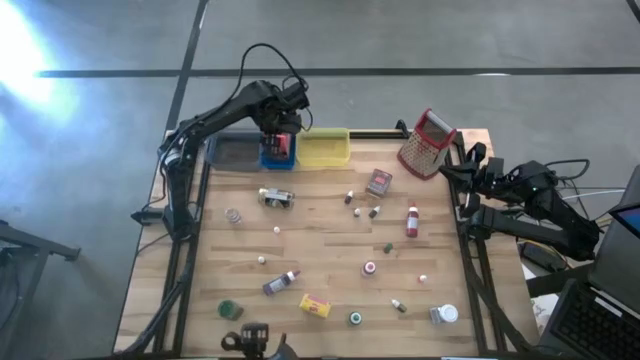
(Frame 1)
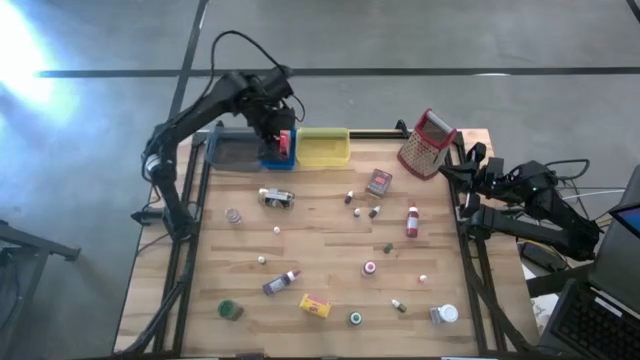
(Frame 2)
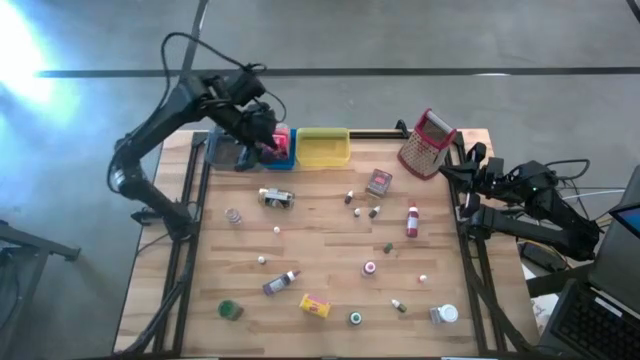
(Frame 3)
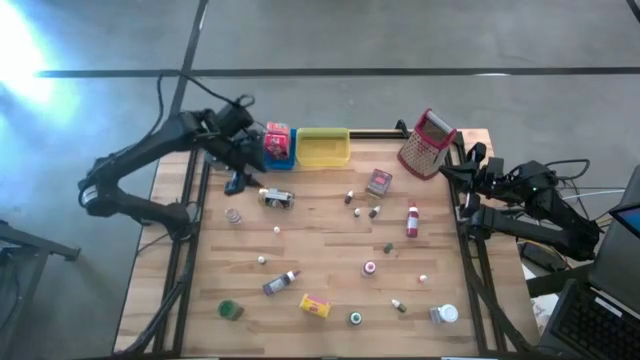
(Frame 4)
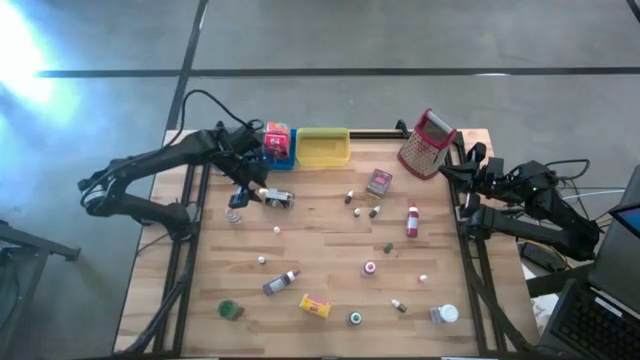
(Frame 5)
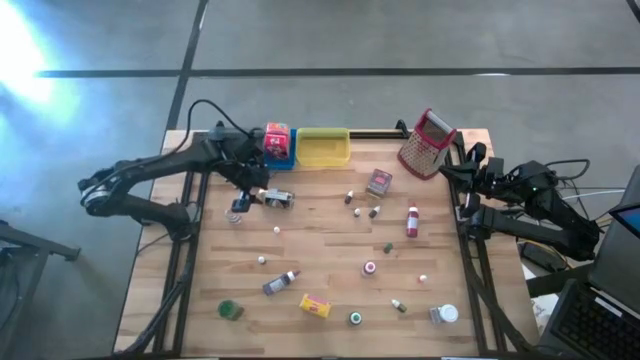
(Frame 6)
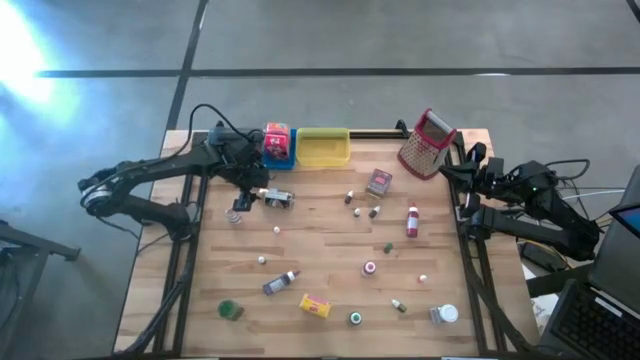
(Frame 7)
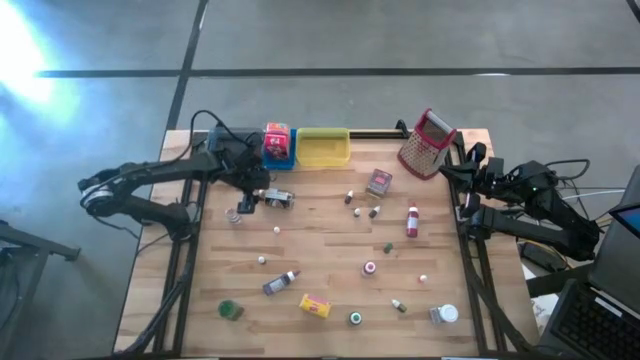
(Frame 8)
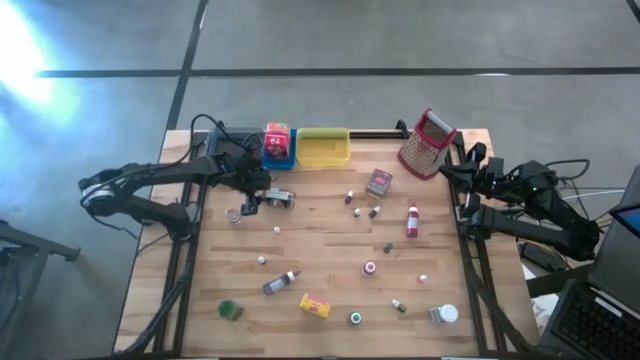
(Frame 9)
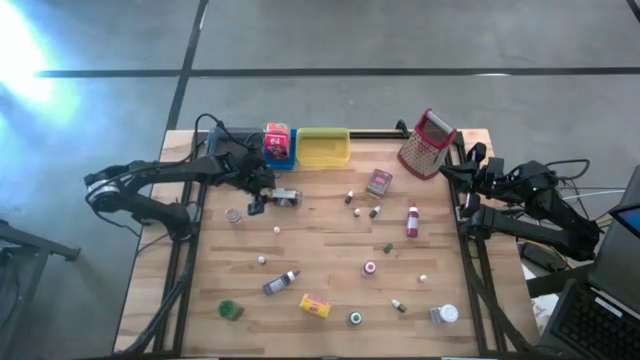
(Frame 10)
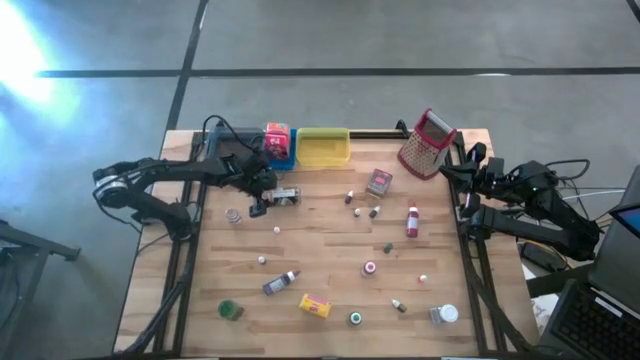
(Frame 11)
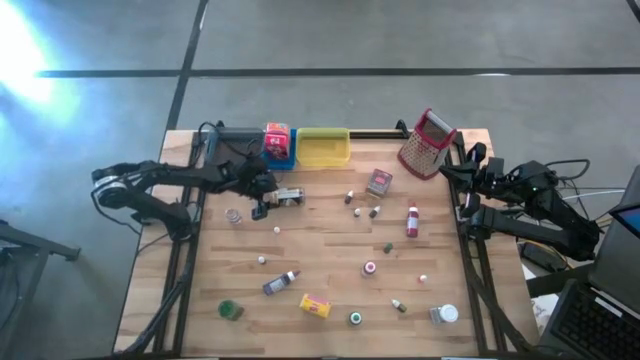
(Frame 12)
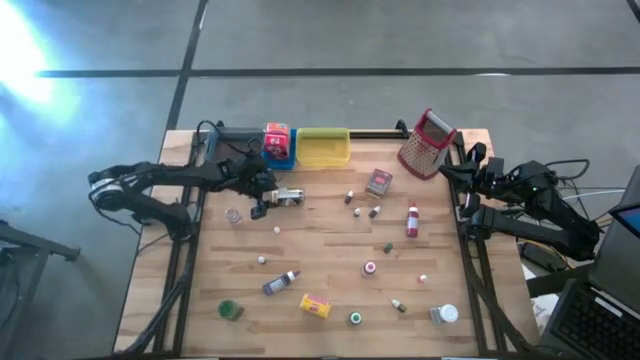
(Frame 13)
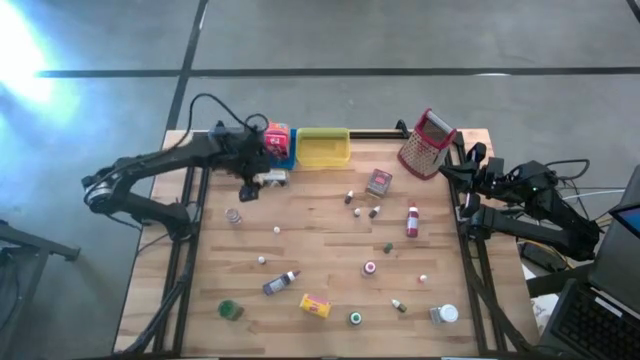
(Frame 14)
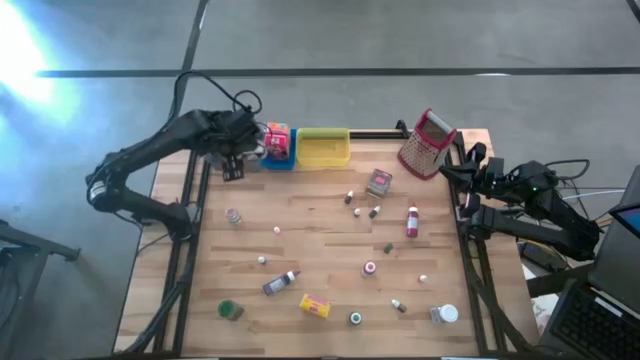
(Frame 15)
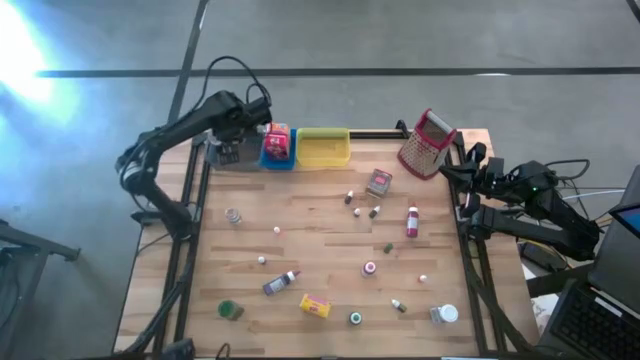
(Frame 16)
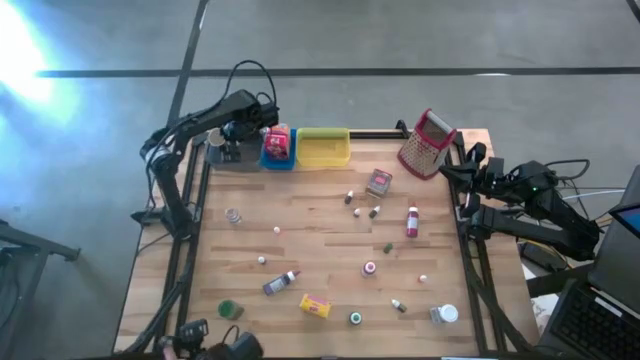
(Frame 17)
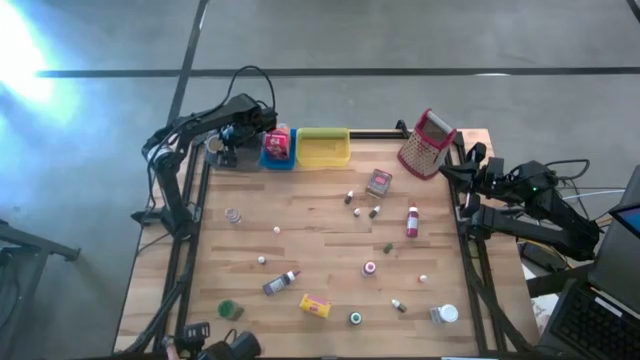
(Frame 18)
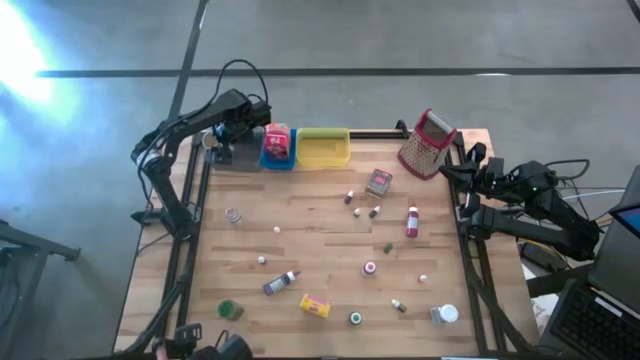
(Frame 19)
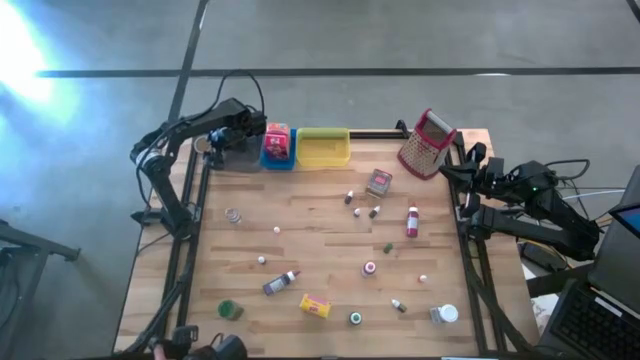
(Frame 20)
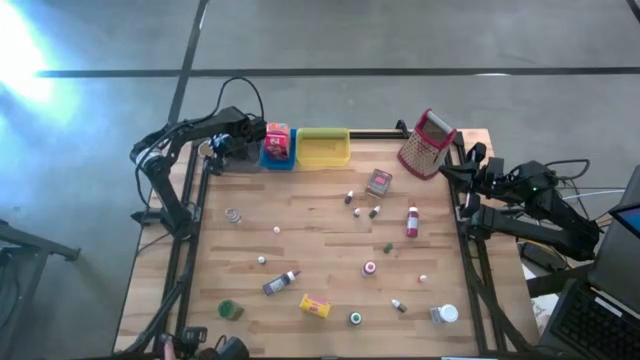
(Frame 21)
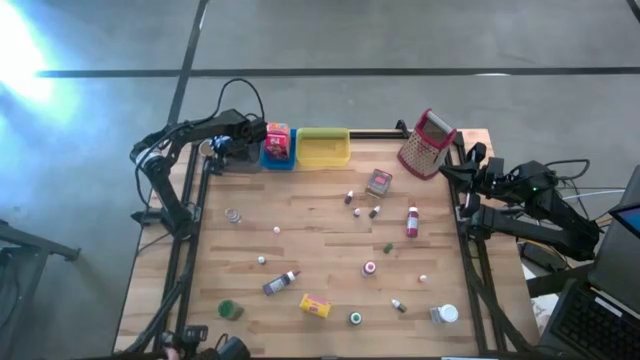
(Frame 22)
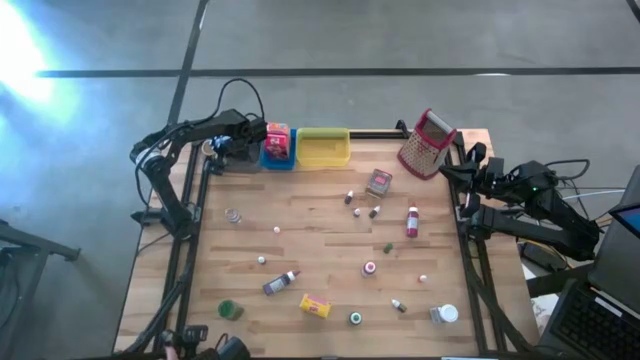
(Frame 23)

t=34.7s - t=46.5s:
Task: Pick & Place Kitchen Items
Put the yellow seasoning bottle into the black bin

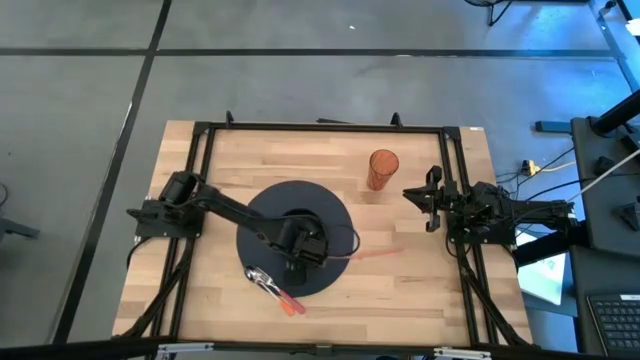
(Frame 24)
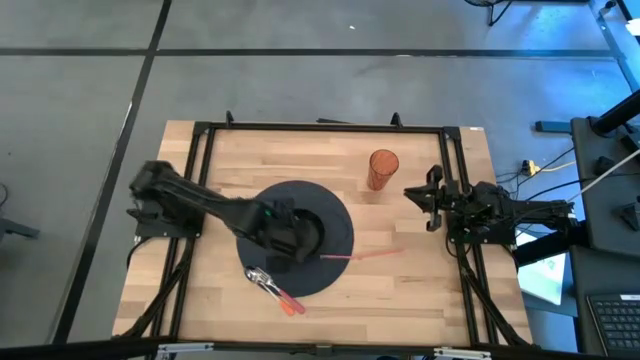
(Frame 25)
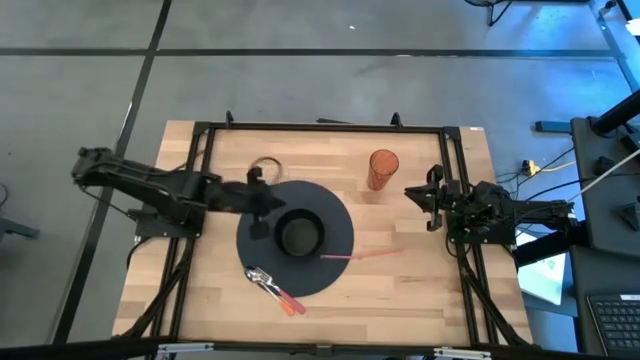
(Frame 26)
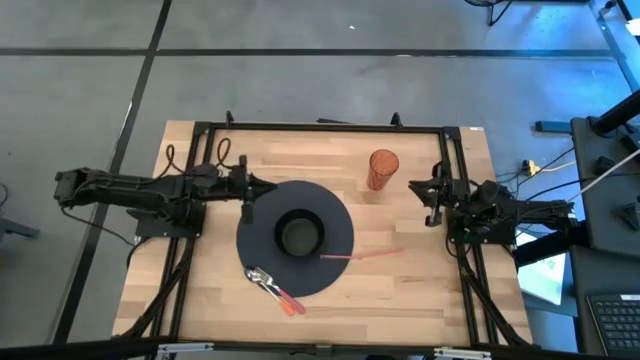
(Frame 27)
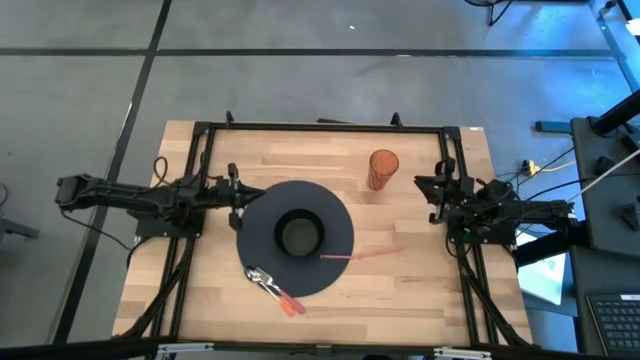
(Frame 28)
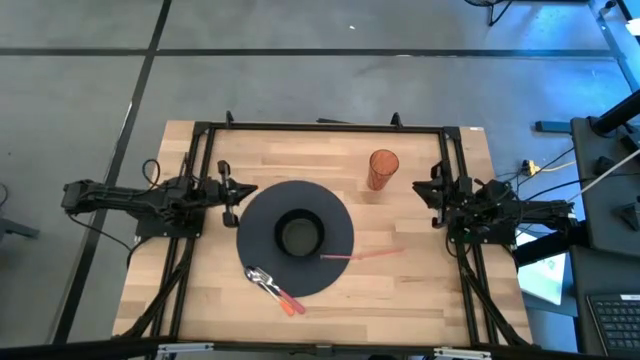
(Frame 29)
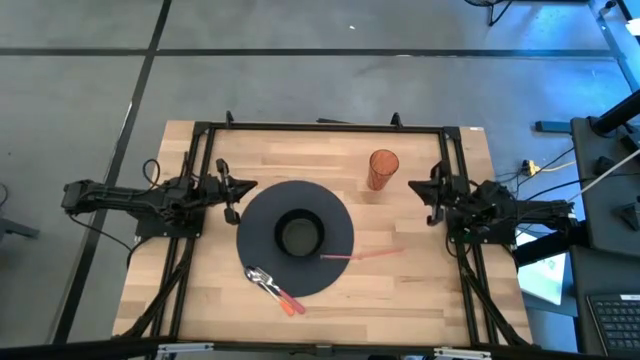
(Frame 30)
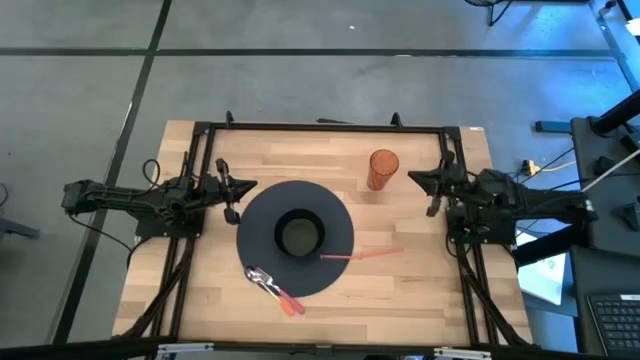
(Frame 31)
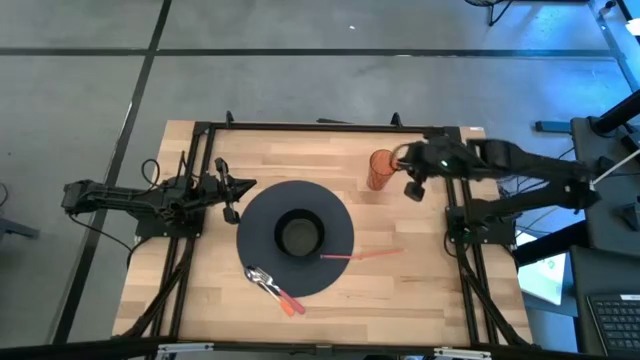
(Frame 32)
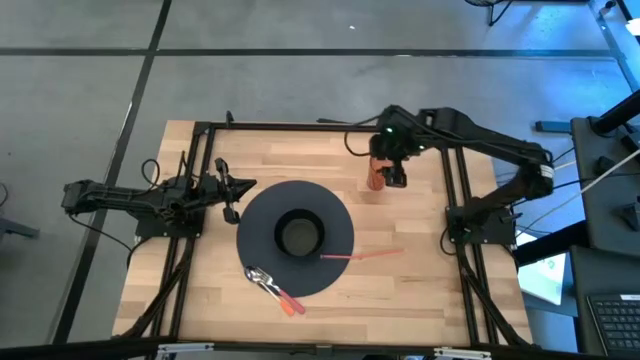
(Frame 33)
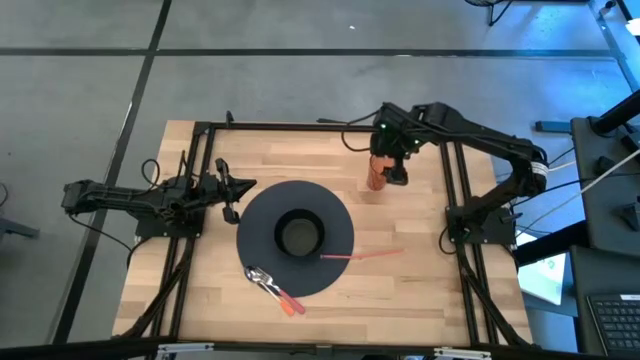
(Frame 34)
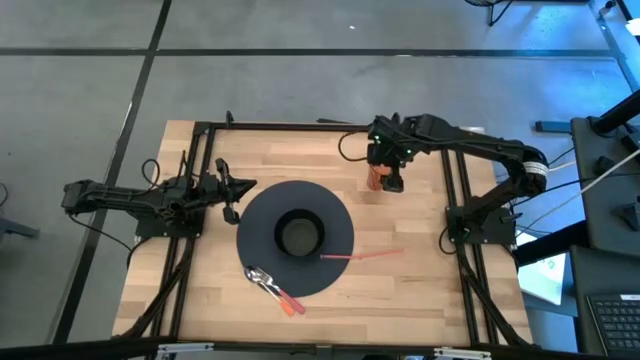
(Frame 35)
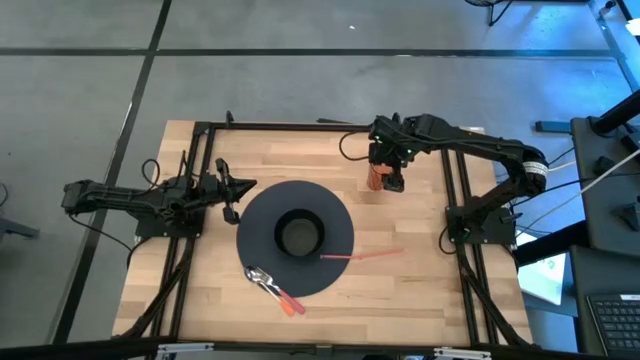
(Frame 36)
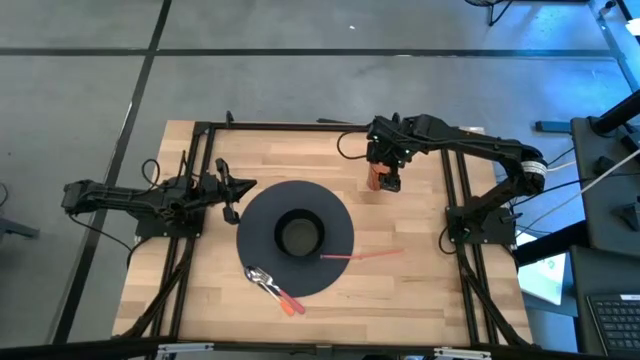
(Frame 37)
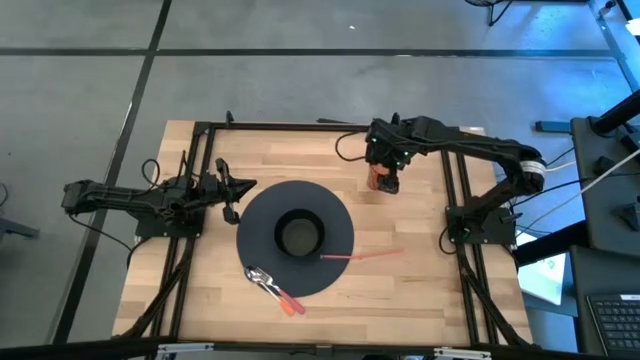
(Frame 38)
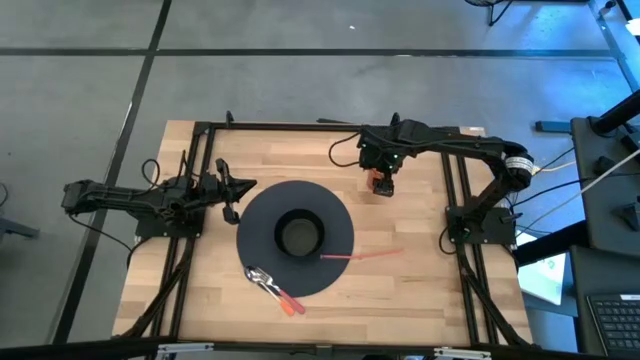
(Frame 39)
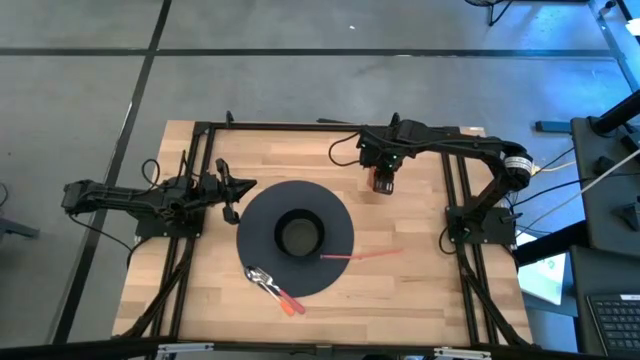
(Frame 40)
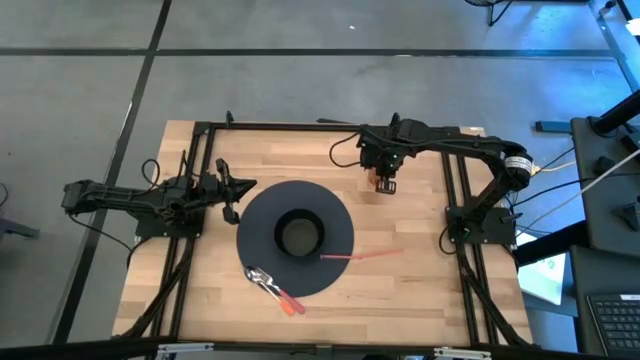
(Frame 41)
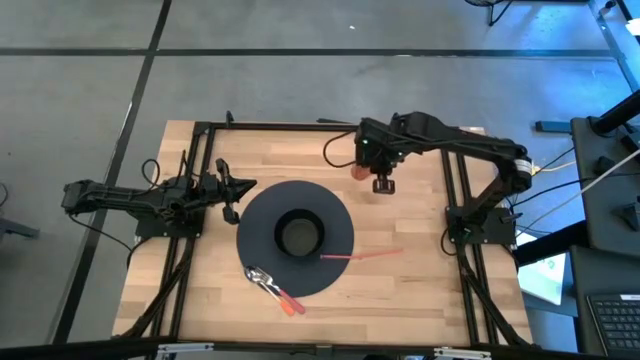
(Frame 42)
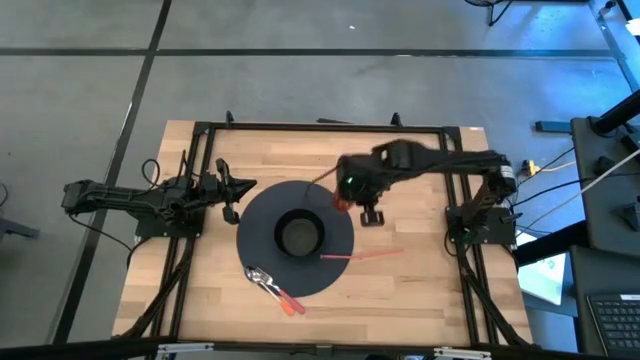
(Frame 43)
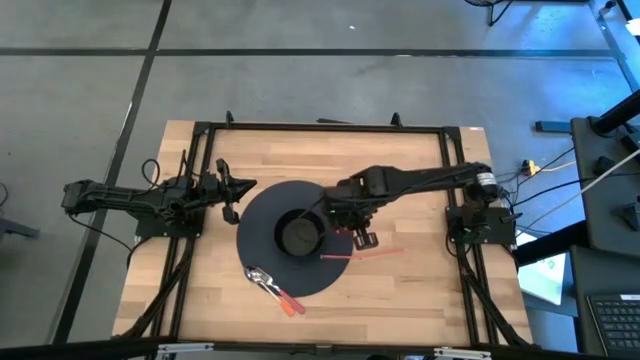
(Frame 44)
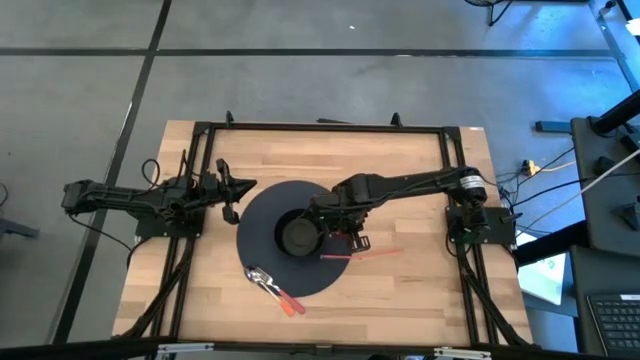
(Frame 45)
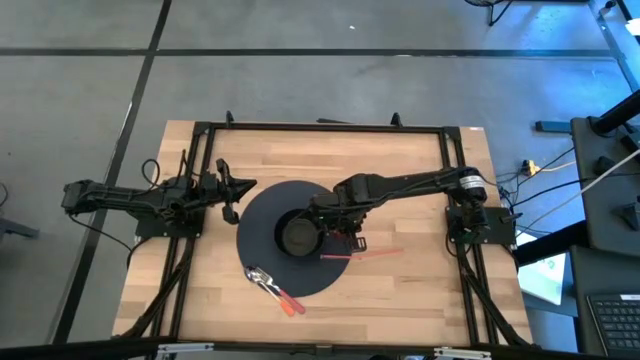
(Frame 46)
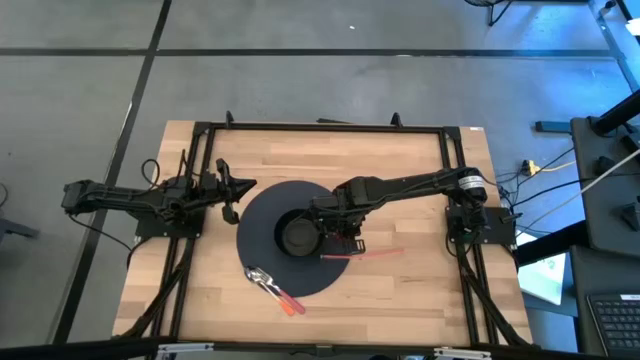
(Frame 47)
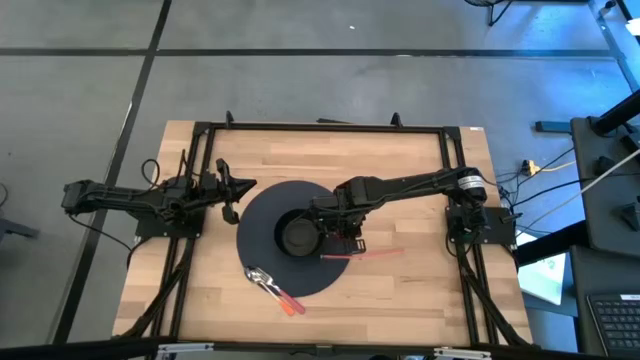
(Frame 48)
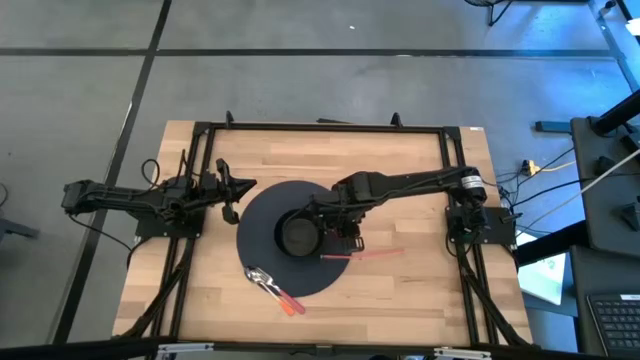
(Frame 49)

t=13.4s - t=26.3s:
Task: Pick & Place Utensil
Put the orange cup on the black tablemat to the right of the black bowl
